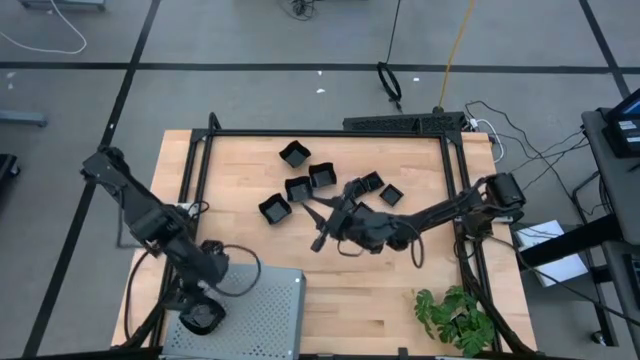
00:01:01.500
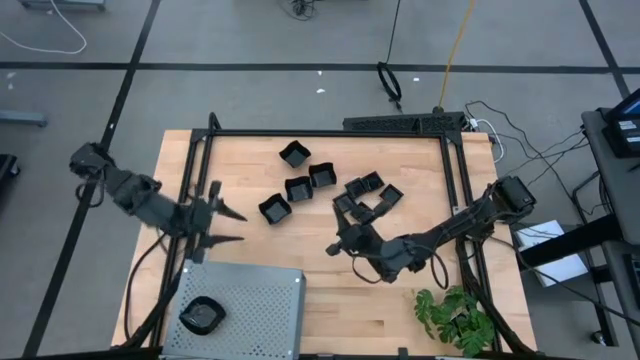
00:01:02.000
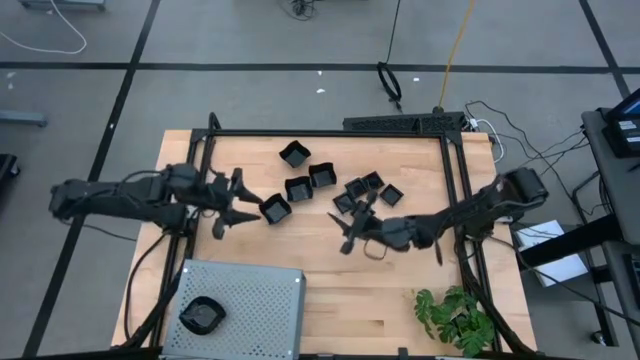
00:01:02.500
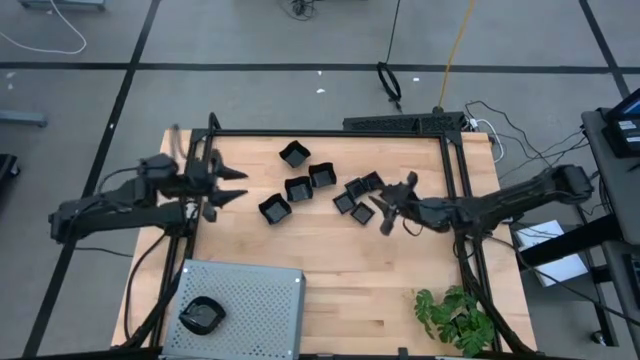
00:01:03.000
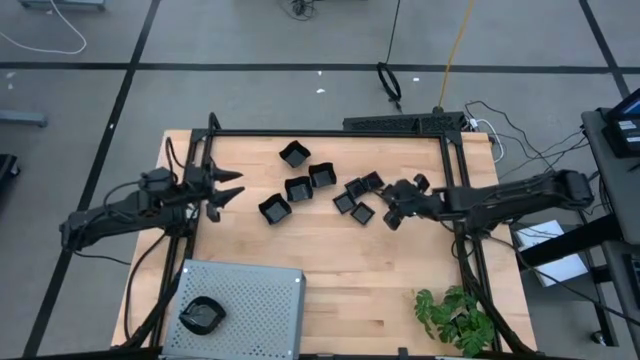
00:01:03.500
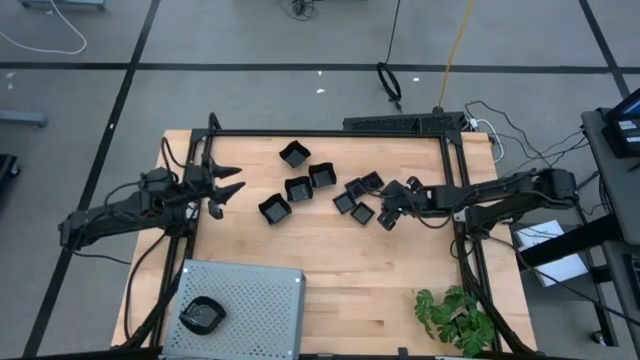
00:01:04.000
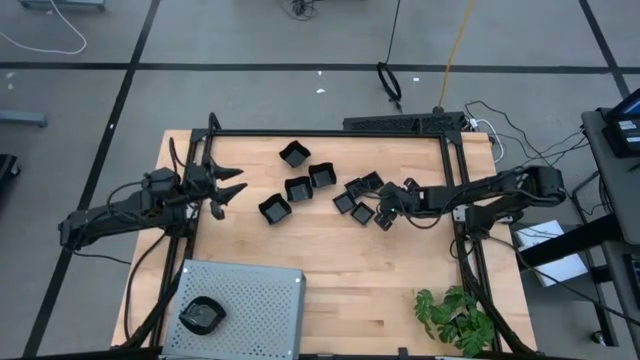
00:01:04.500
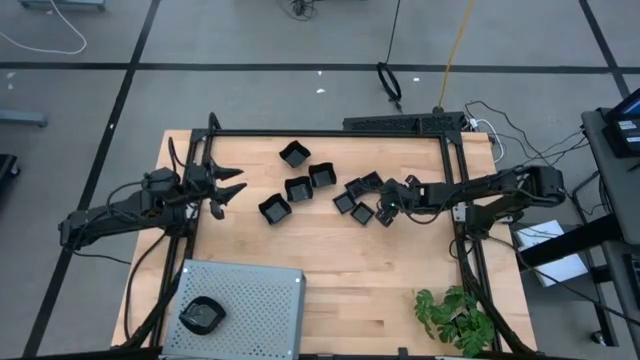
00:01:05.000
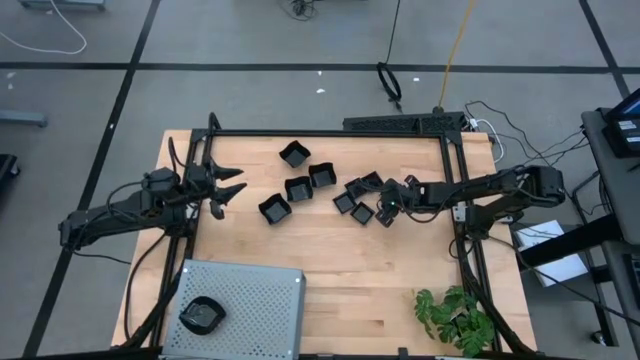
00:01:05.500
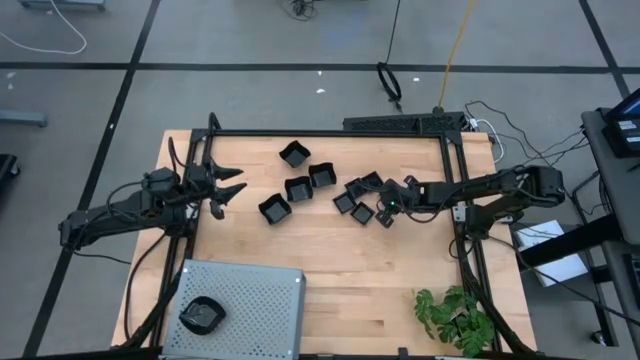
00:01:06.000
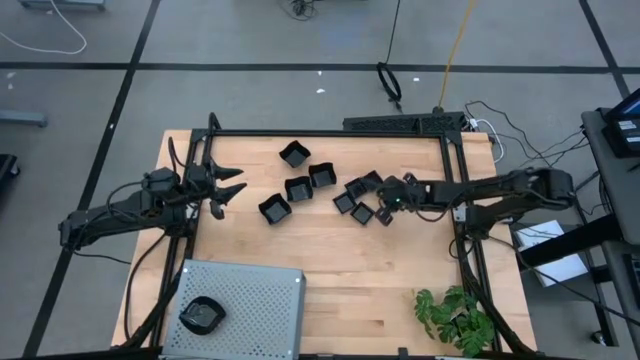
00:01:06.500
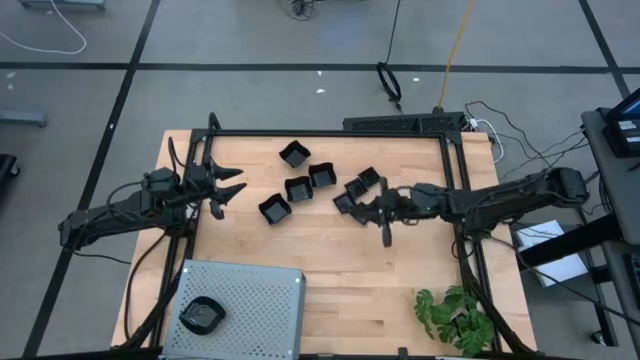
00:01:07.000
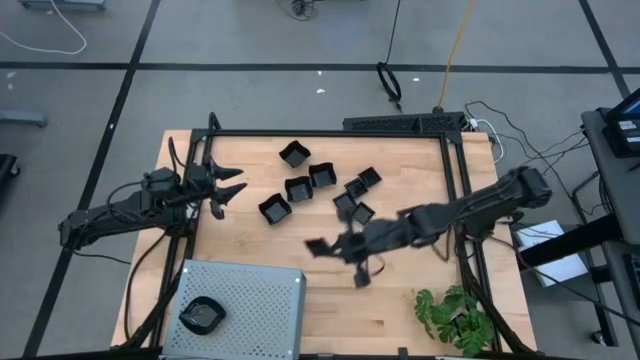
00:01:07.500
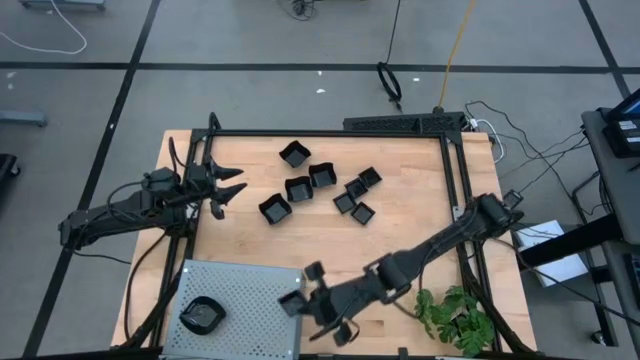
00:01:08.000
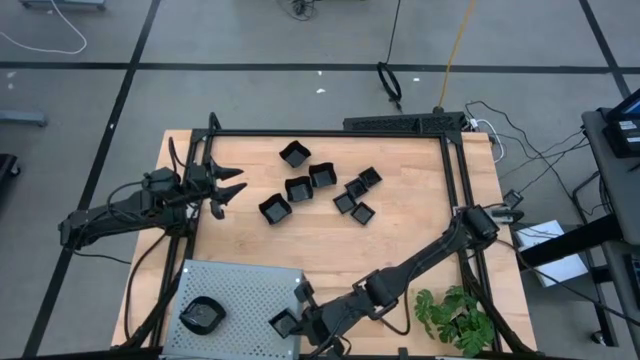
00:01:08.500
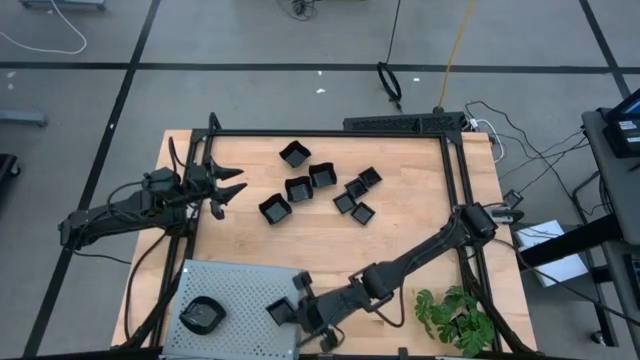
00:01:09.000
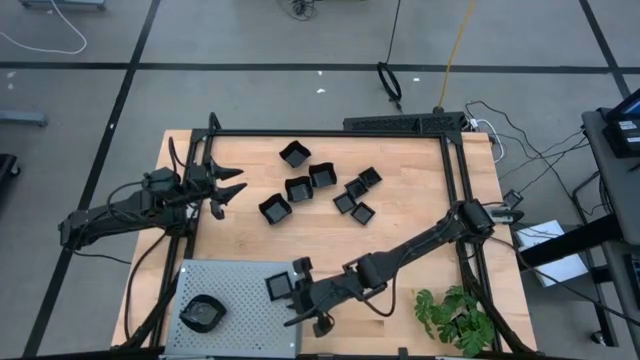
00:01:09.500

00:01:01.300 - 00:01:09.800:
Task: Pick & Place Mini shaped plates
Put the square plate on the shelf

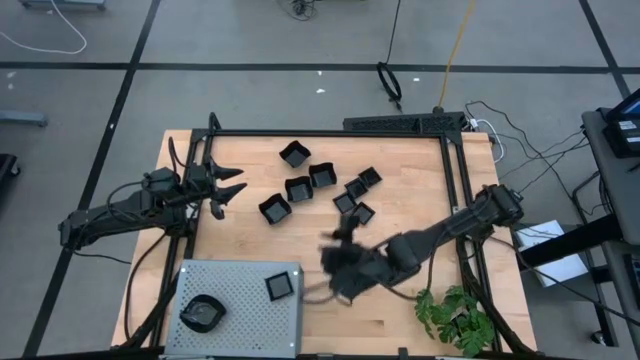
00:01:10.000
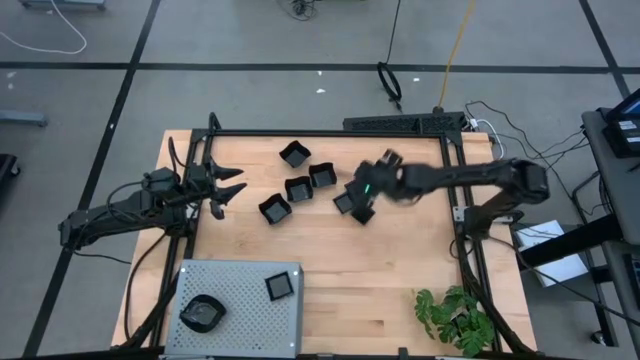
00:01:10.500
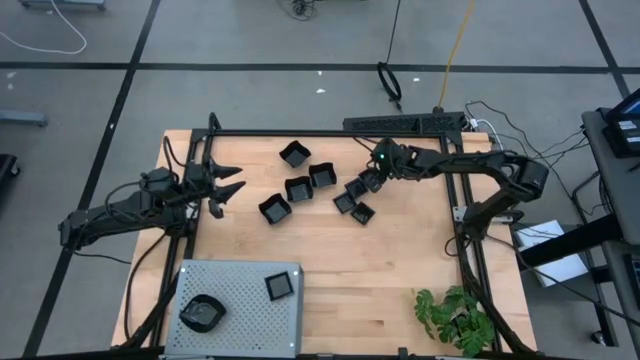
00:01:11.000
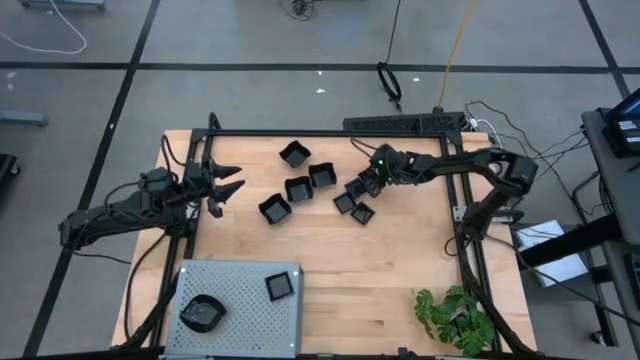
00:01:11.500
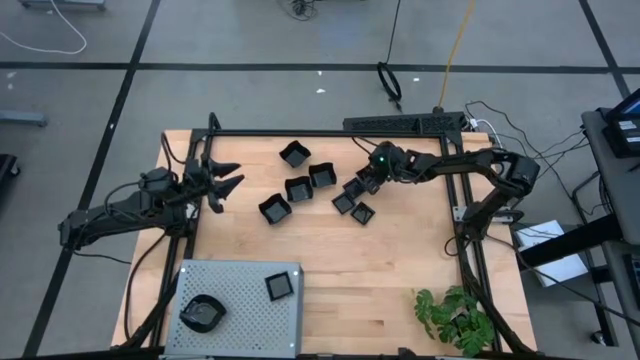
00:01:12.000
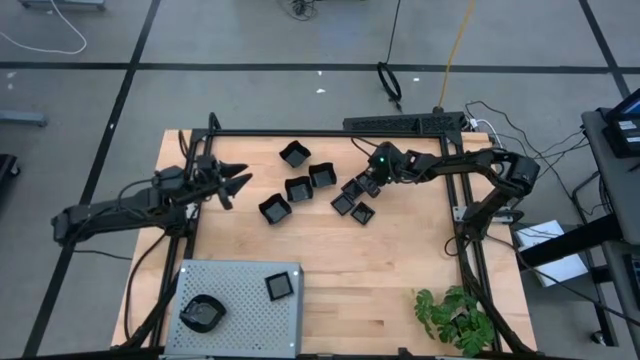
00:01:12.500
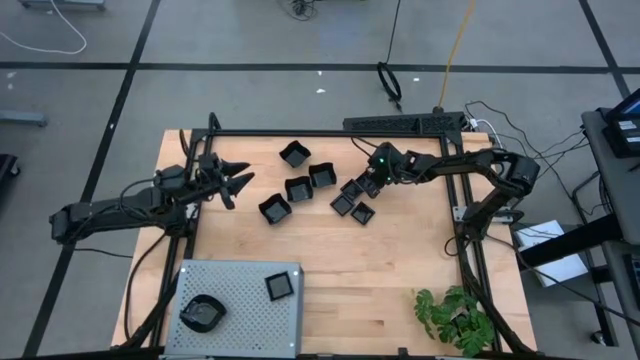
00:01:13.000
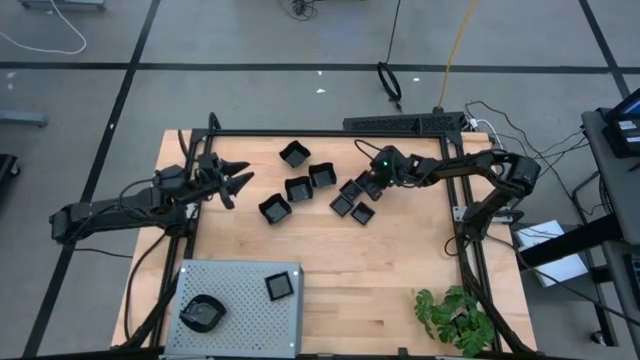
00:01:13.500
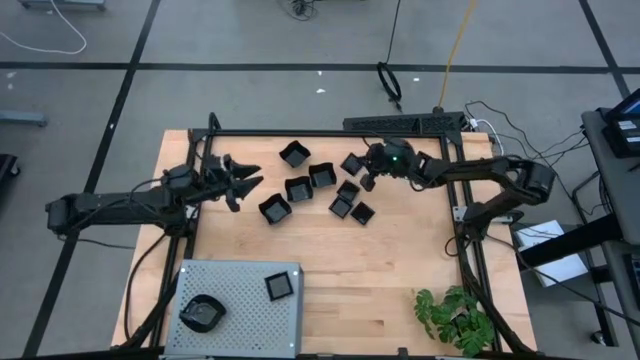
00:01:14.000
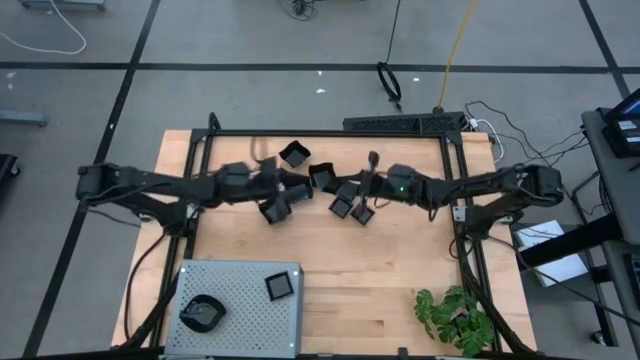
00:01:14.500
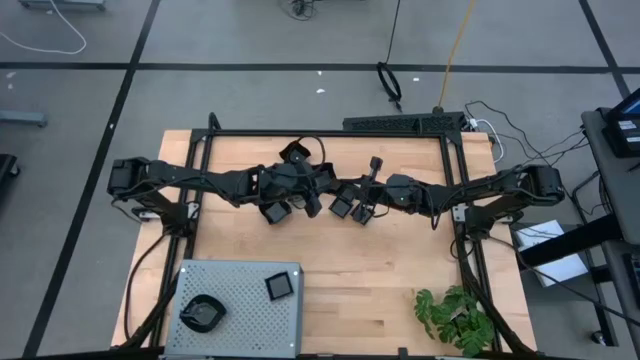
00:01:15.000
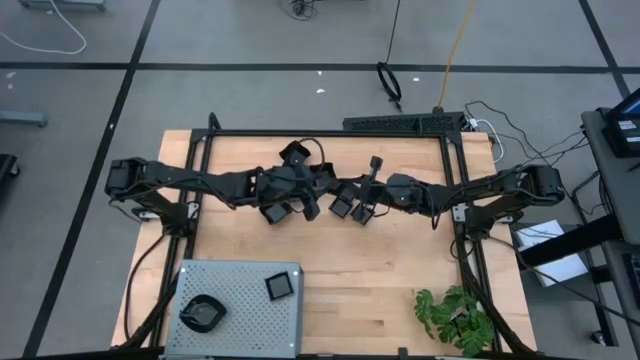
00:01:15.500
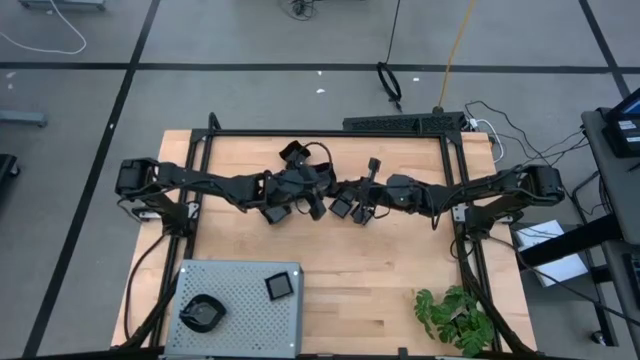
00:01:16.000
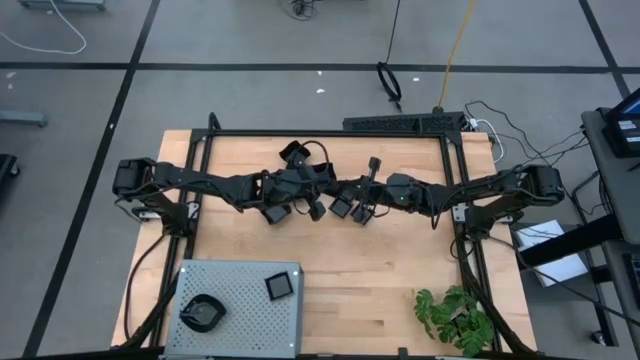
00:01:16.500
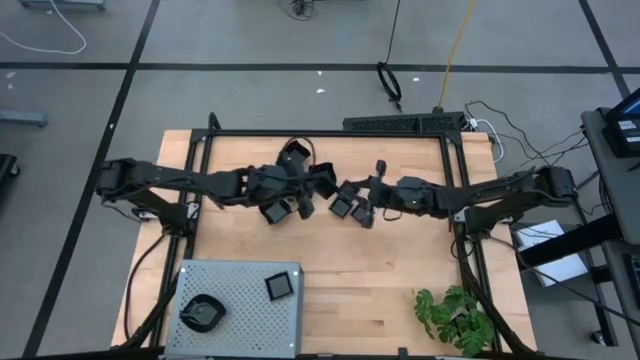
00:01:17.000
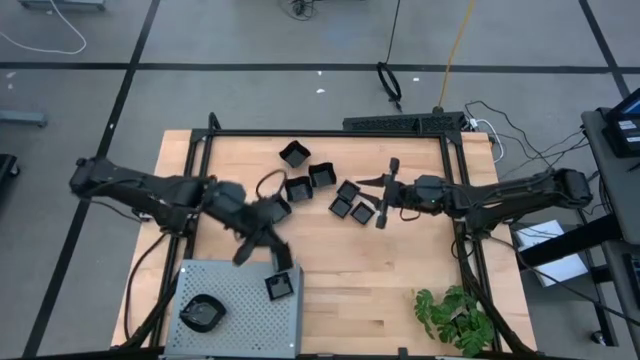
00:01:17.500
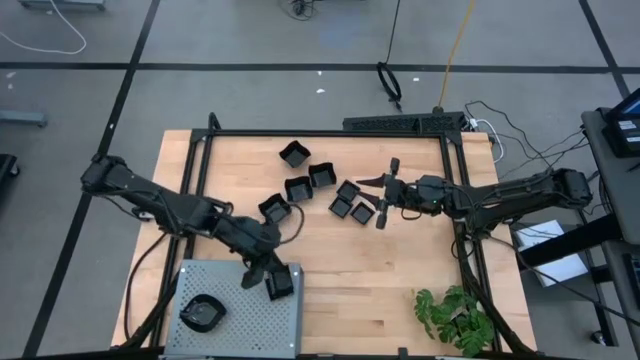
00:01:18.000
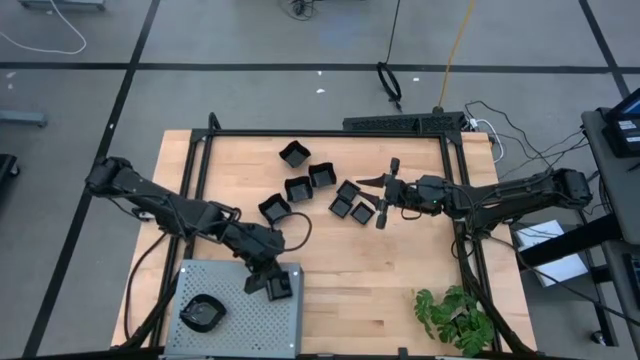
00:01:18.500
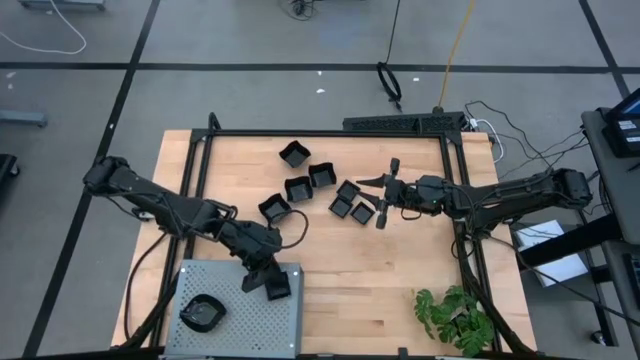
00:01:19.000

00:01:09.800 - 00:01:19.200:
Stack the square plate on top of the other square plate on the shelf

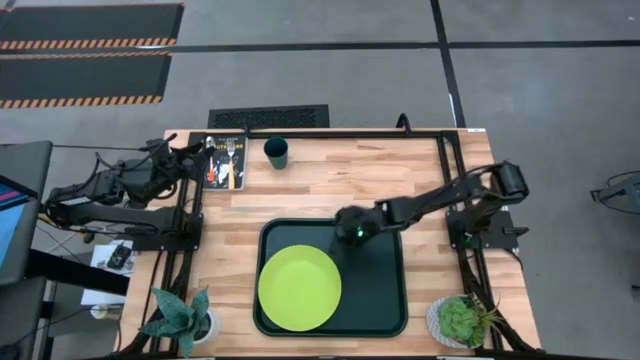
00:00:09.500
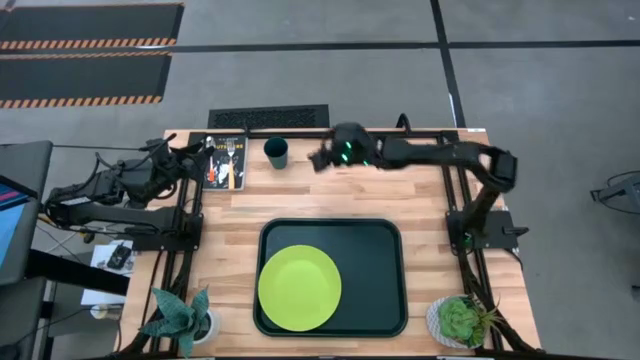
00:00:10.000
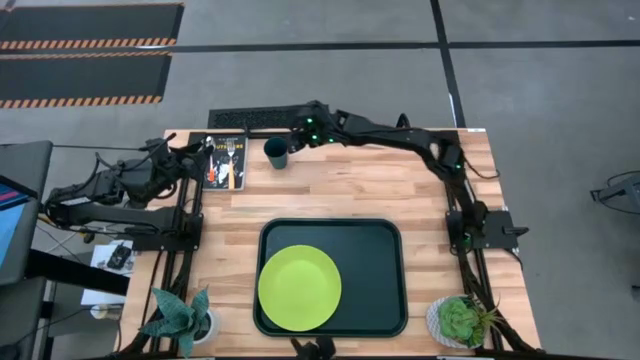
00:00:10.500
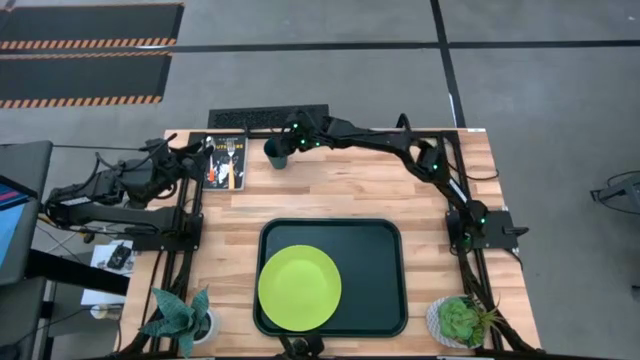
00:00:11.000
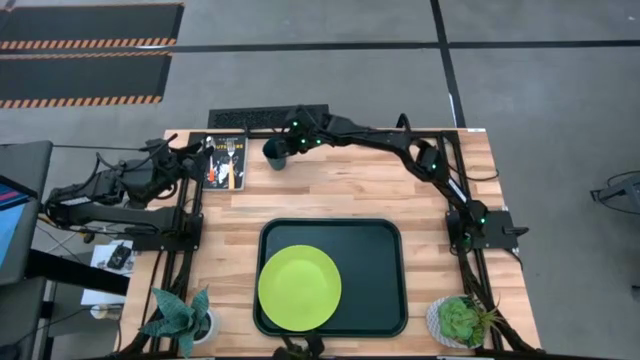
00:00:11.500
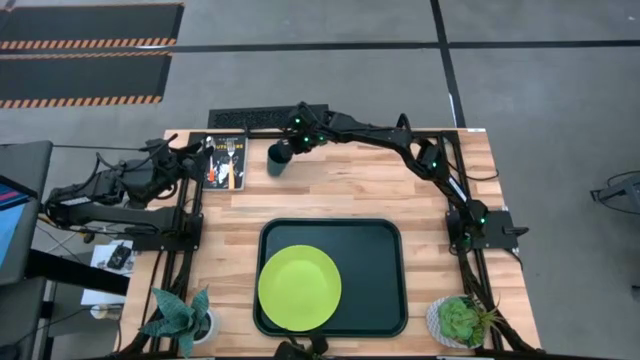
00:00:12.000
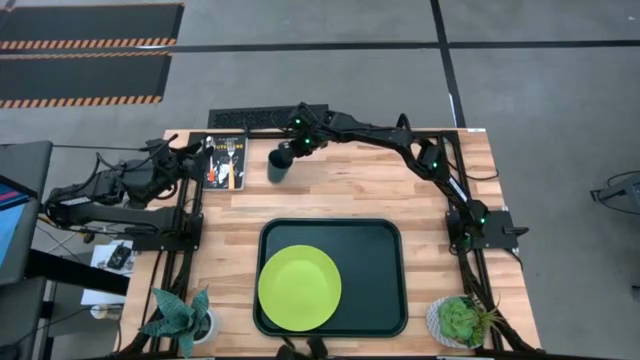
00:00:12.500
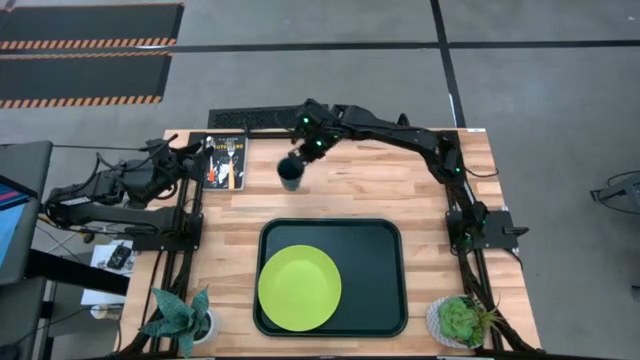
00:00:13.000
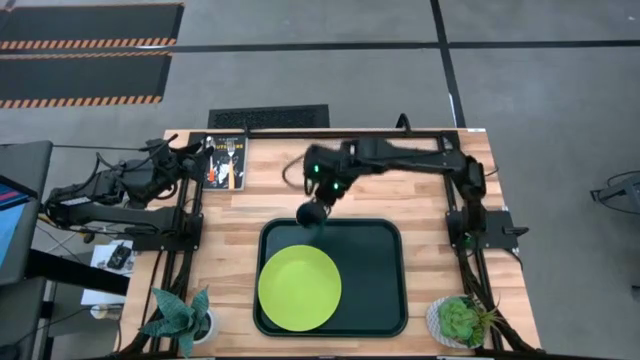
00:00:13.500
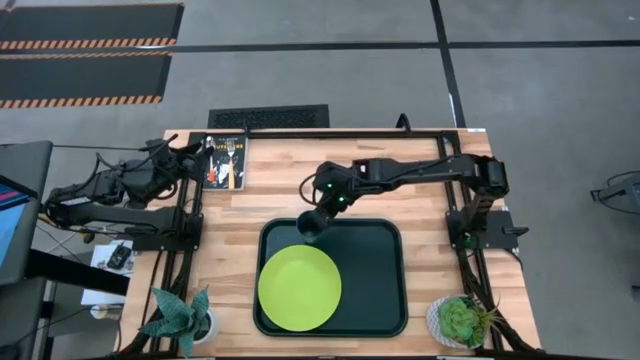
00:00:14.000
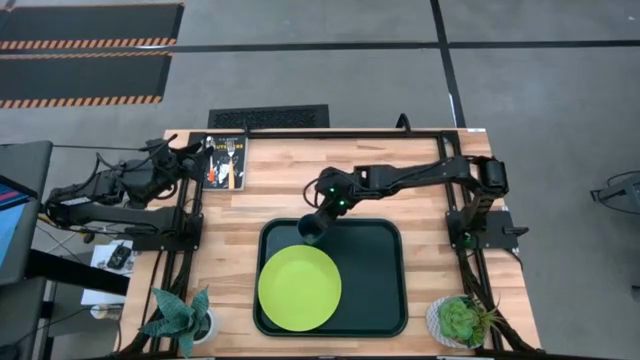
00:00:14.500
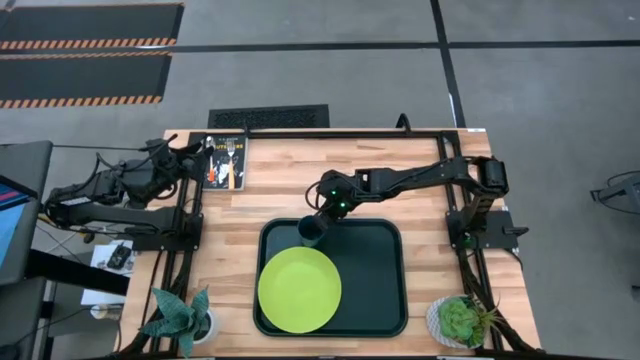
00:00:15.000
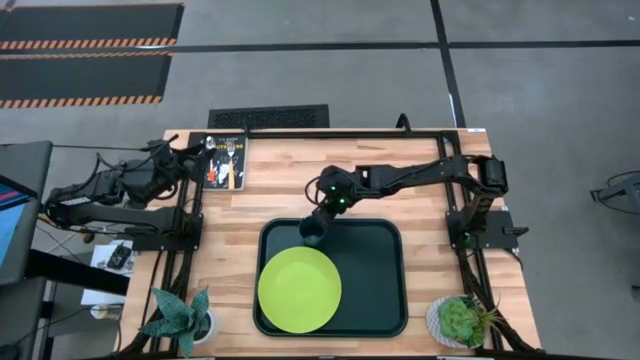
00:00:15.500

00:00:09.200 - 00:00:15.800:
Task: Pick and place plate/cup/fork/spoon on tray
Put the blue cup to the top of the green plate on the green serving tray
